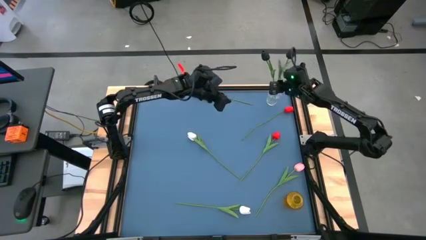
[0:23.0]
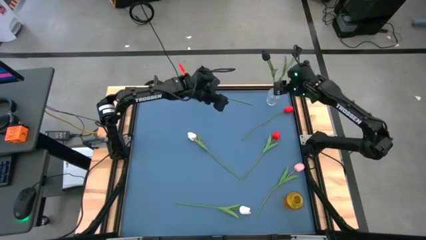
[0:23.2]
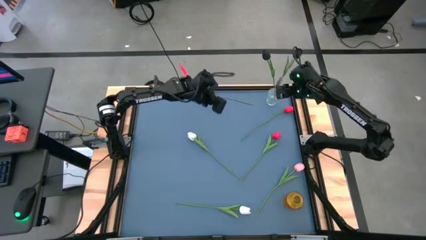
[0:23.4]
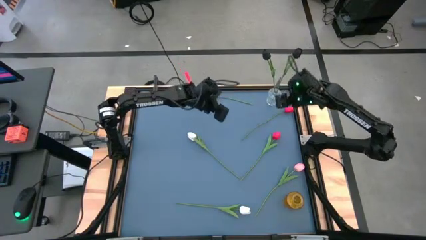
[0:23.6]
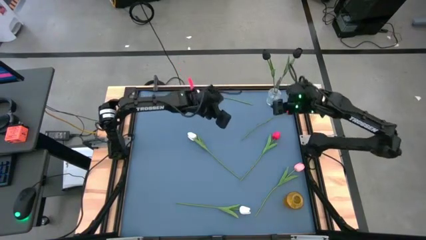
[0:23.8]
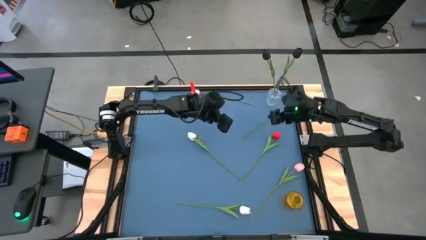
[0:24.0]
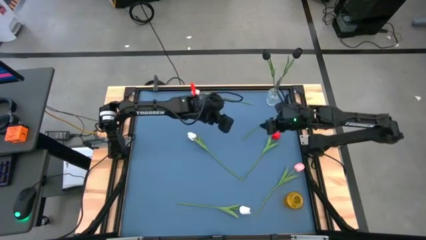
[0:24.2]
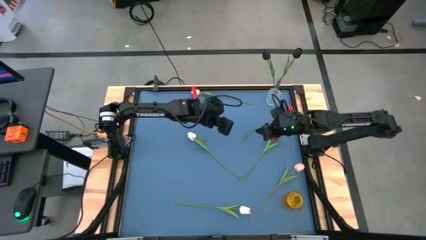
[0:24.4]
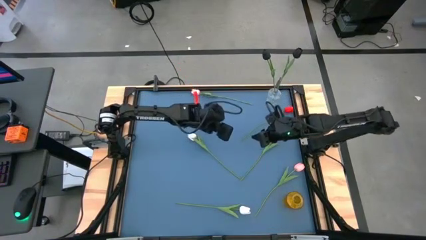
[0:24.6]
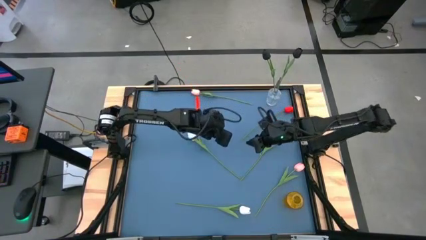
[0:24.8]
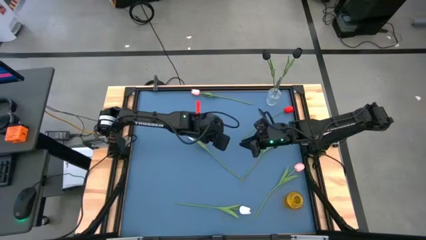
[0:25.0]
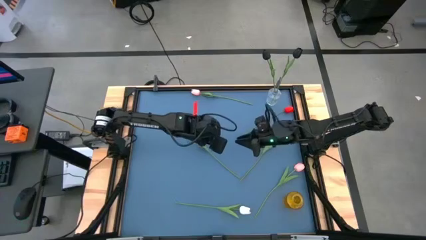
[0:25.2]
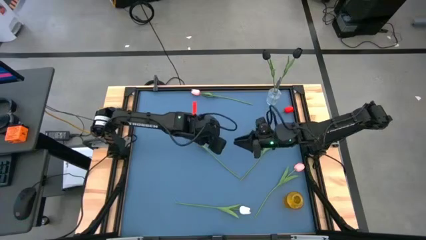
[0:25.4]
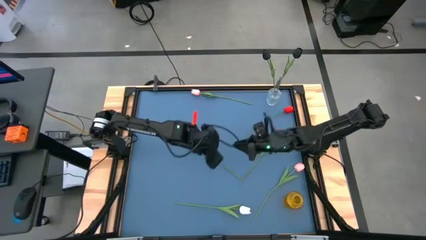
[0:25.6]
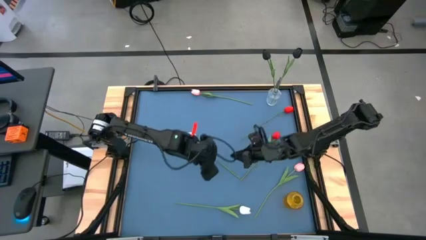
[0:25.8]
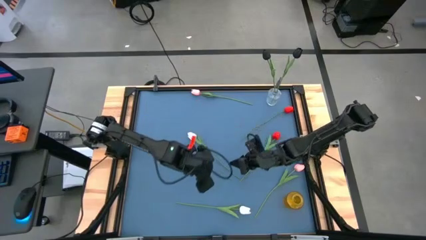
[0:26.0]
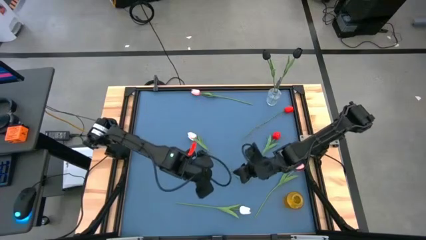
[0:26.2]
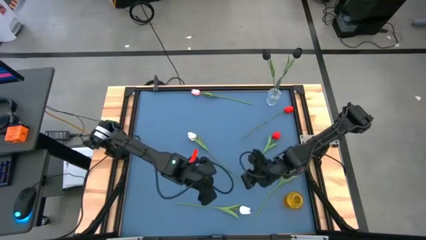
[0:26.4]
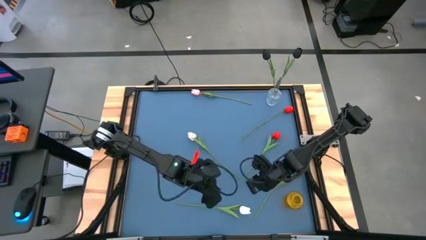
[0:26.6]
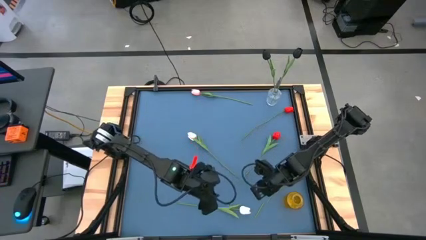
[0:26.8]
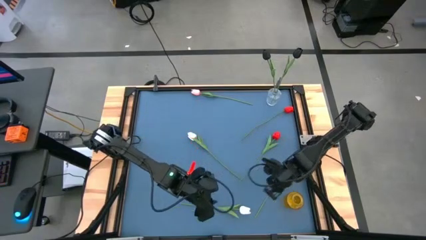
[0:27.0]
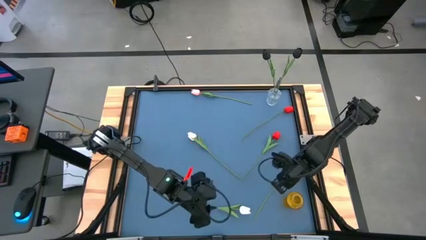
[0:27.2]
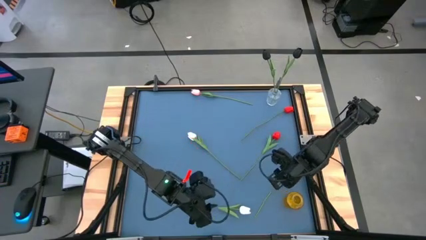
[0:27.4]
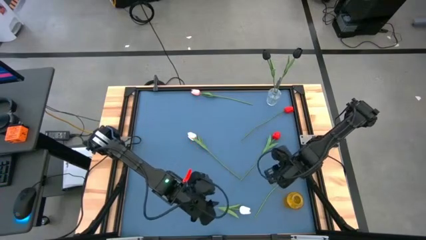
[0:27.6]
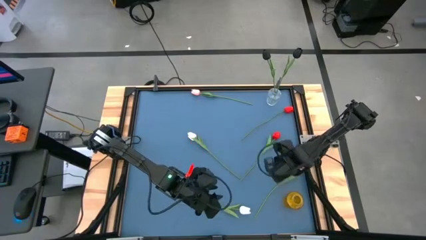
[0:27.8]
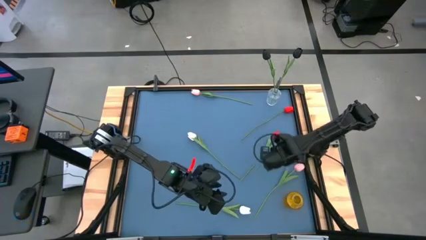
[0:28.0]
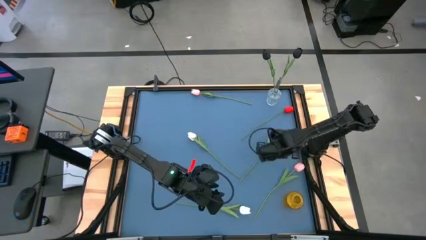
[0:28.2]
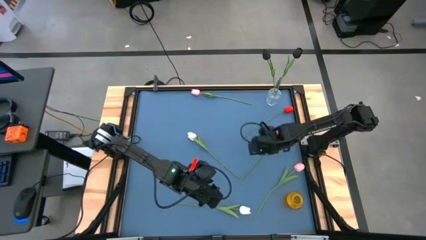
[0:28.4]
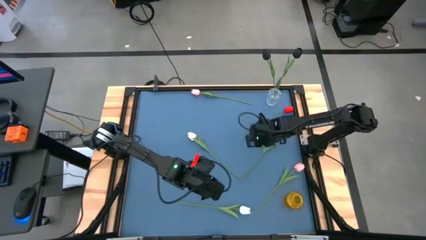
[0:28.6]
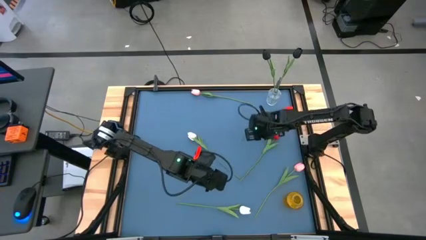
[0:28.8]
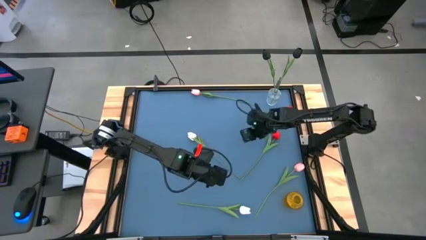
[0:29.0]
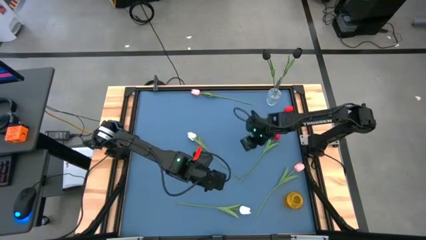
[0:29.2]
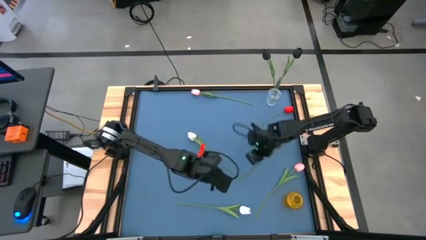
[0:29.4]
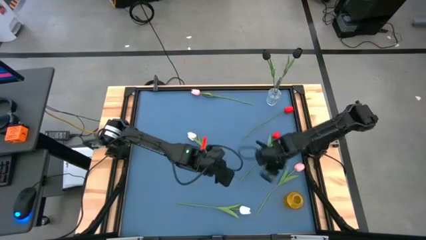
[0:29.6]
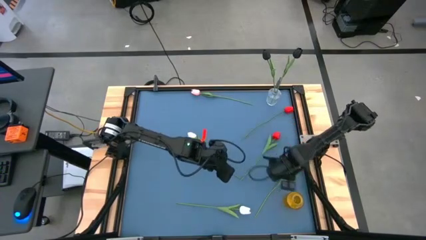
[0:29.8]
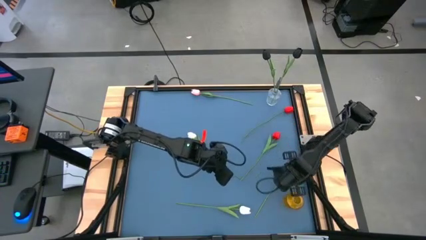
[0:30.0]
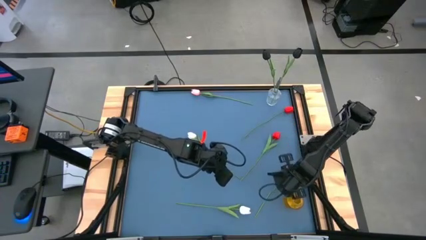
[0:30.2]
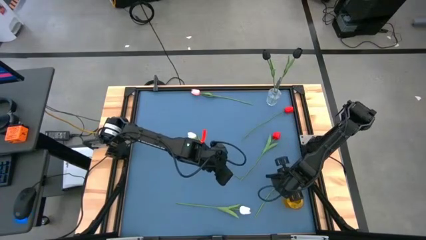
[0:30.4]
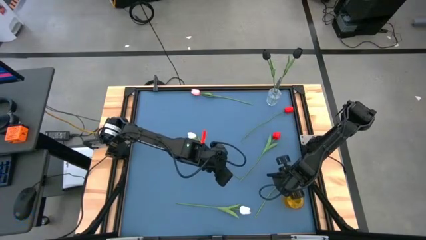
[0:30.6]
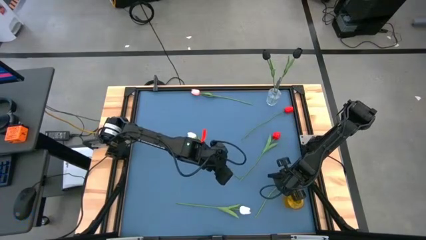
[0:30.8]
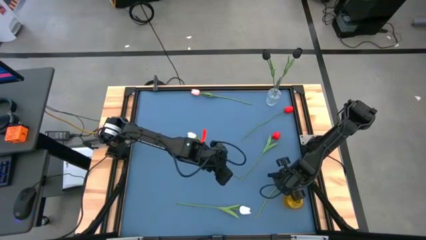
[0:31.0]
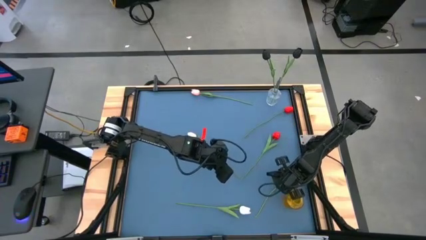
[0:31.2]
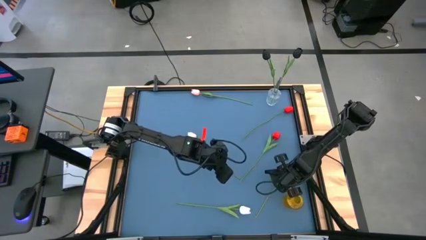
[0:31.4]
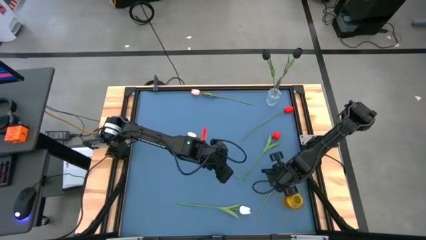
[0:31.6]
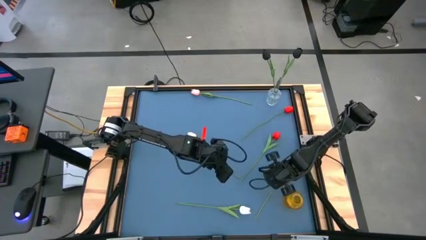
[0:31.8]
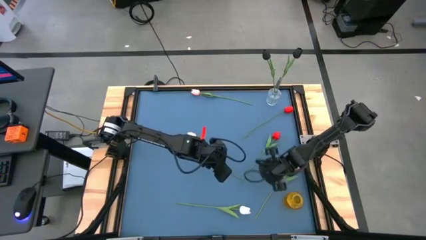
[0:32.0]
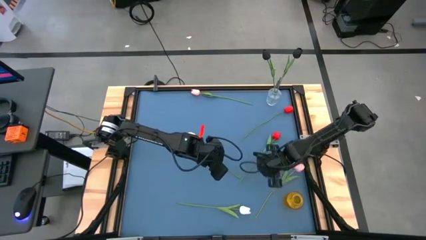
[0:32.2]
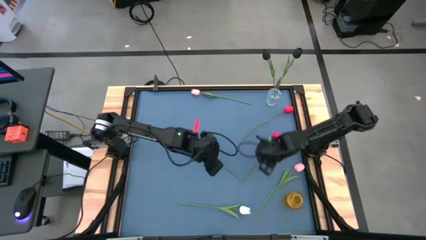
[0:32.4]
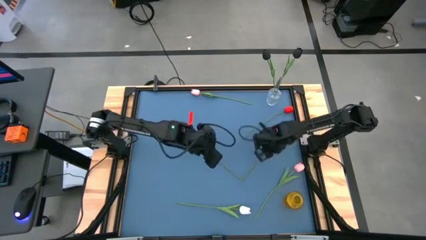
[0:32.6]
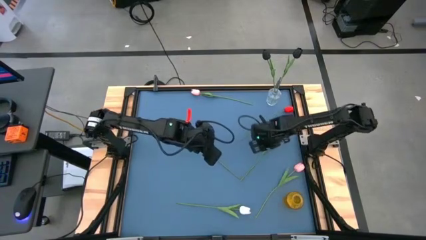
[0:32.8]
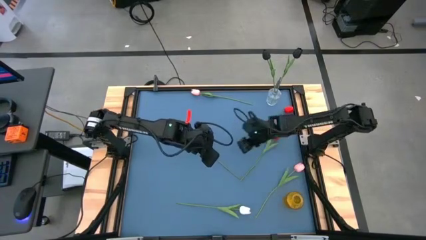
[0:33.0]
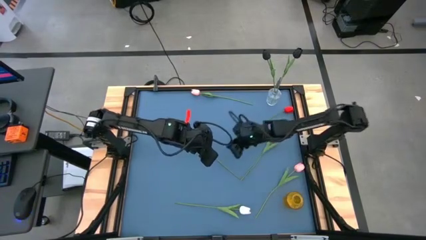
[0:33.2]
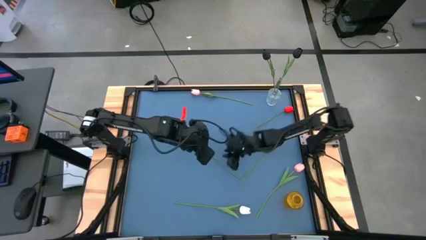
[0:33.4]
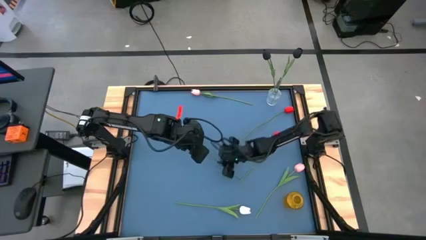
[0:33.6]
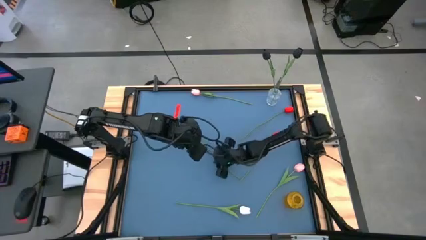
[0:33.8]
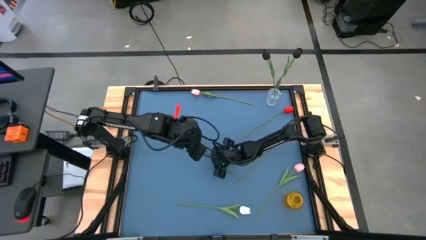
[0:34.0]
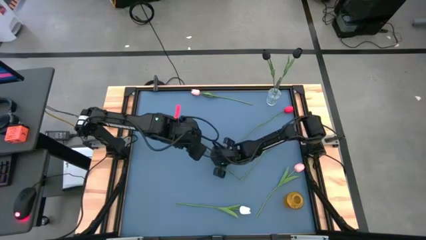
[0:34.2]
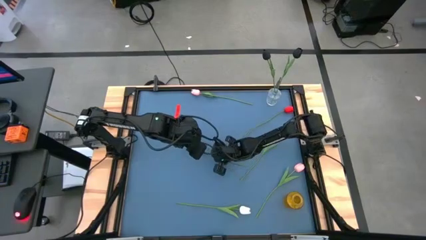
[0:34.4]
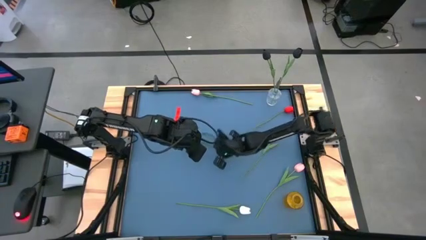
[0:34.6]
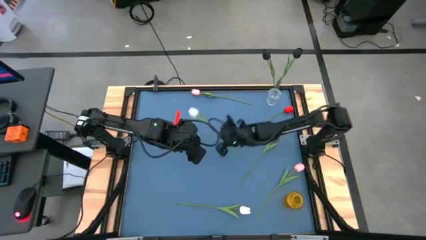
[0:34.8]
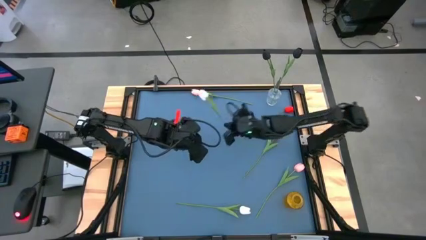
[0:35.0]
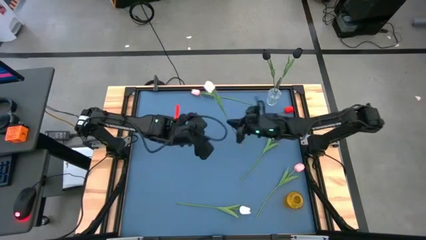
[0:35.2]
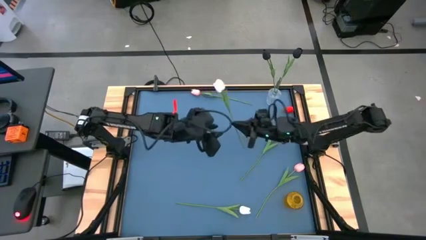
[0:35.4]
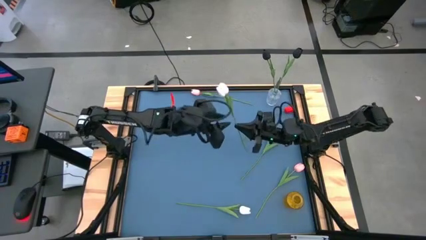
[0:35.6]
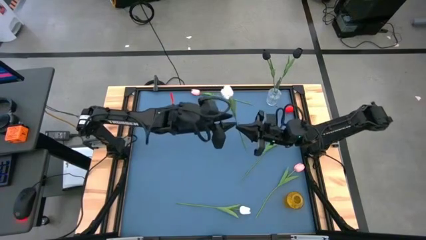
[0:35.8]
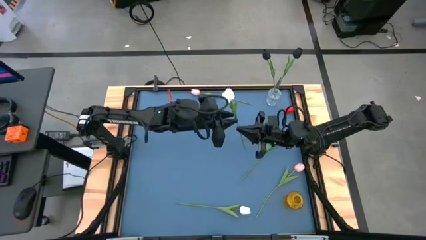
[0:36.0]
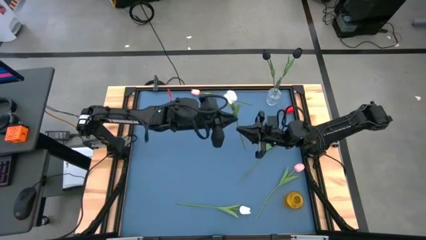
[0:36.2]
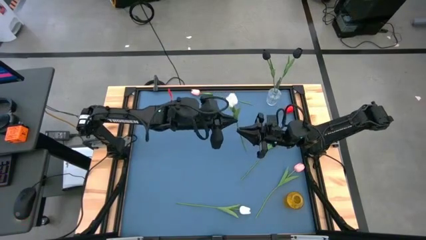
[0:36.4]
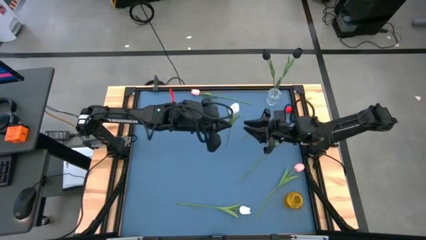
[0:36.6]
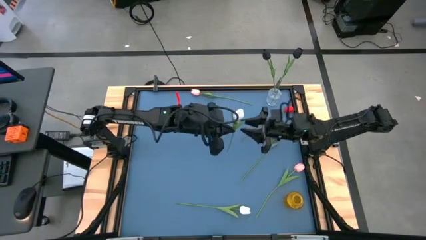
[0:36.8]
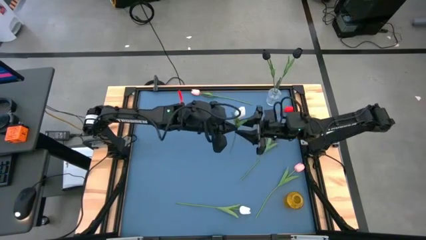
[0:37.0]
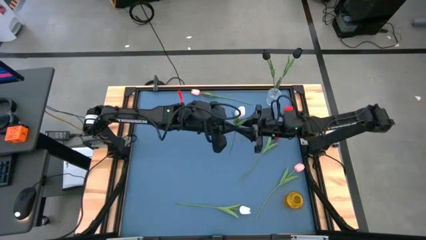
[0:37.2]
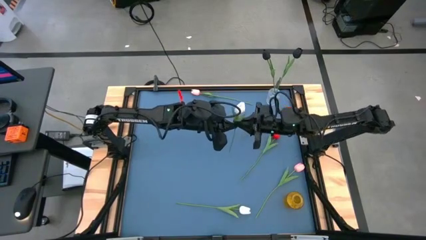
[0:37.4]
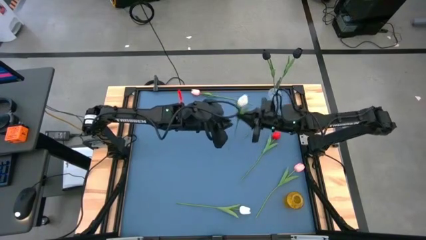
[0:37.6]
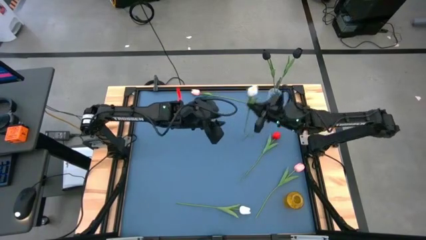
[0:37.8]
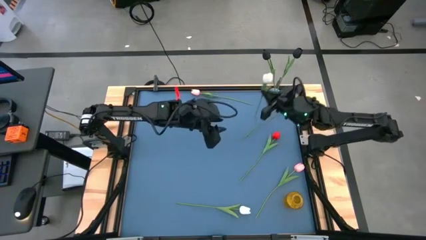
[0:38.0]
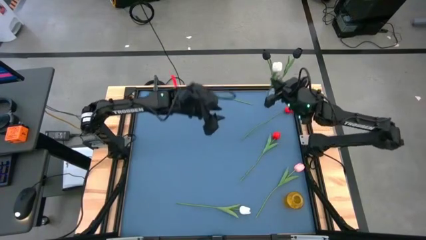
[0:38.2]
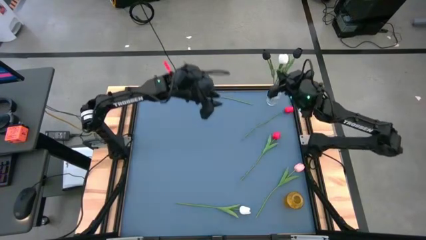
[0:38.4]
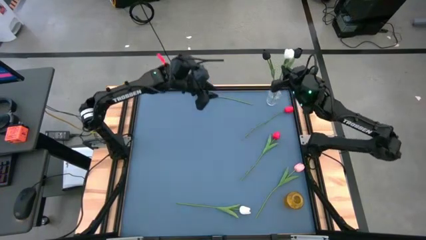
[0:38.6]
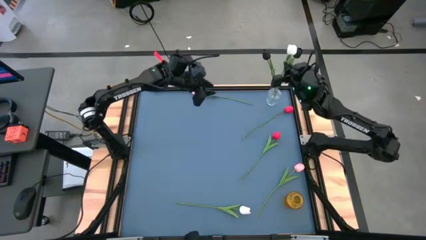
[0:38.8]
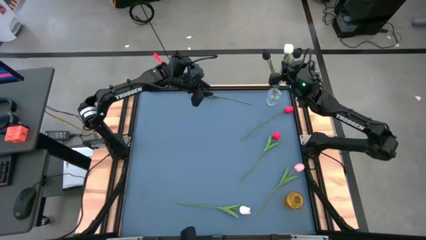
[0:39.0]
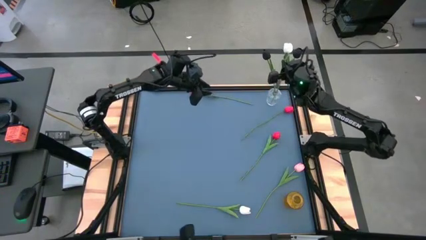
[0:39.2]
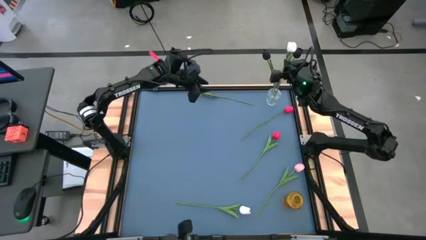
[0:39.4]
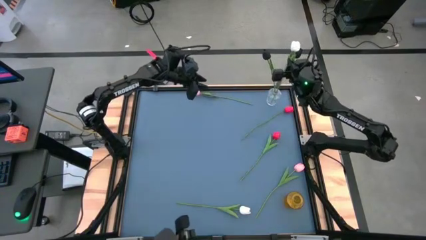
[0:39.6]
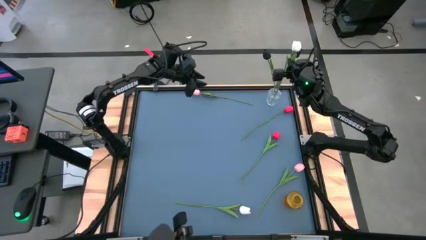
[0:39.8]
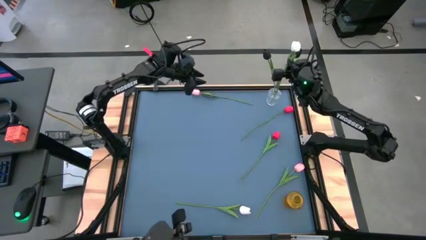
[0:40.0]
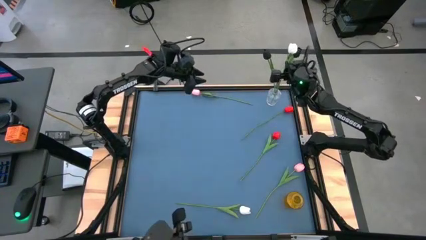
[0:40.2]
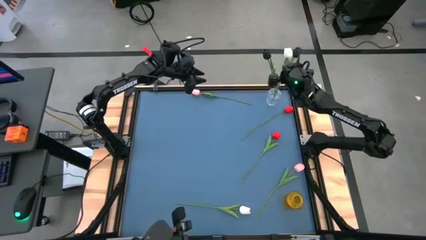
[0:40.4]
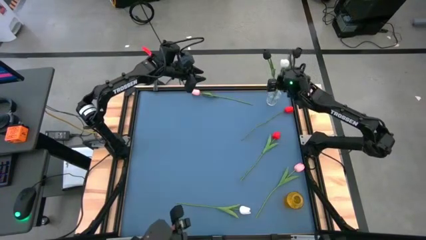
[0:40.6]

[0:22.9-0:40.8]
Task: Sort flowers into vase by color
Put the top white flower into the transparent vase
